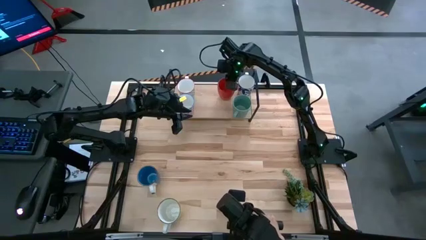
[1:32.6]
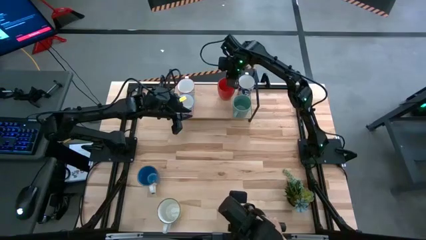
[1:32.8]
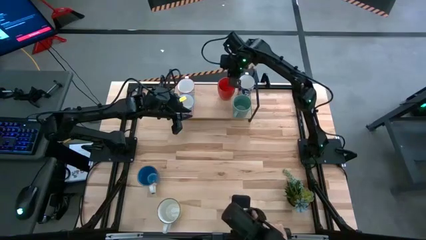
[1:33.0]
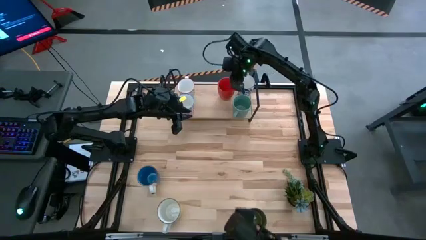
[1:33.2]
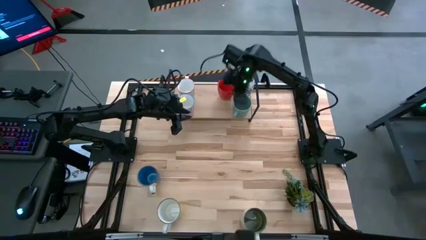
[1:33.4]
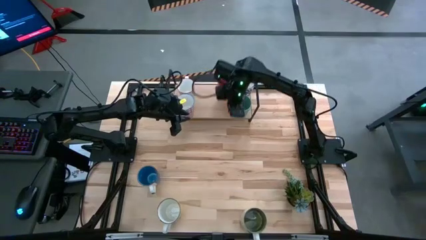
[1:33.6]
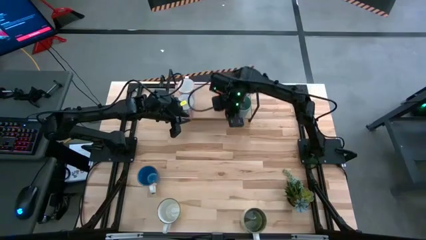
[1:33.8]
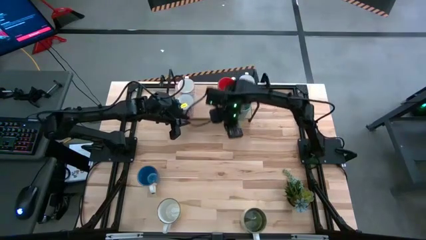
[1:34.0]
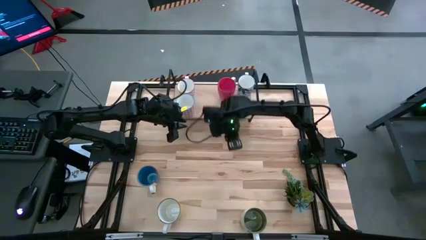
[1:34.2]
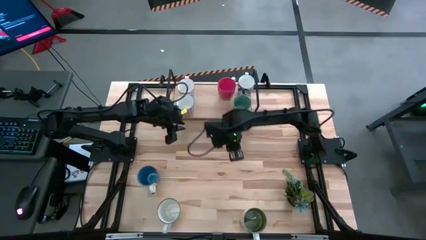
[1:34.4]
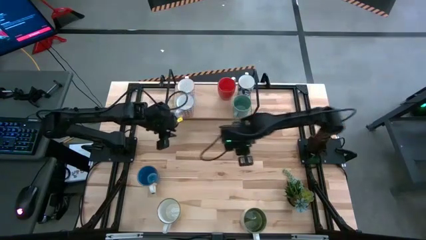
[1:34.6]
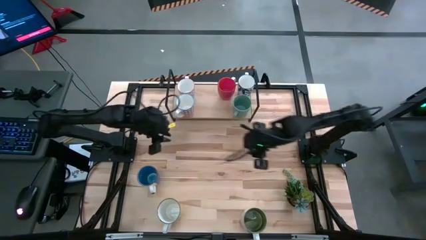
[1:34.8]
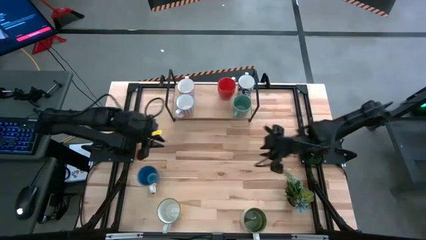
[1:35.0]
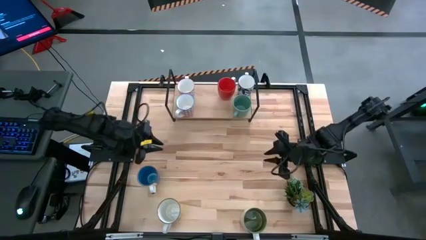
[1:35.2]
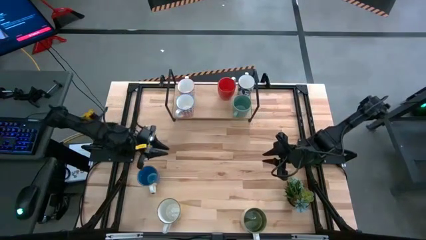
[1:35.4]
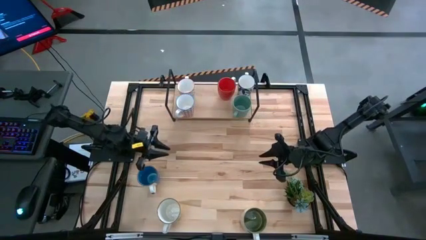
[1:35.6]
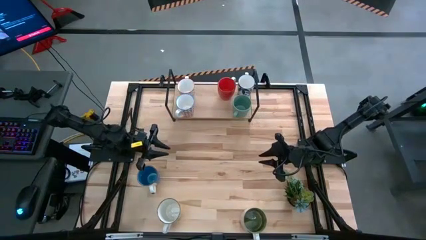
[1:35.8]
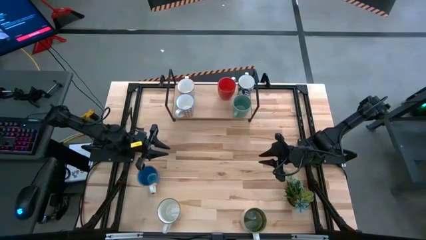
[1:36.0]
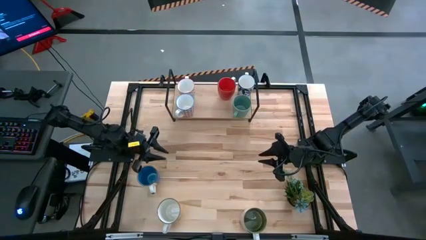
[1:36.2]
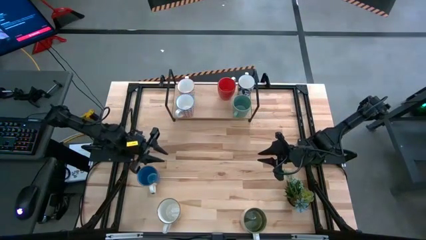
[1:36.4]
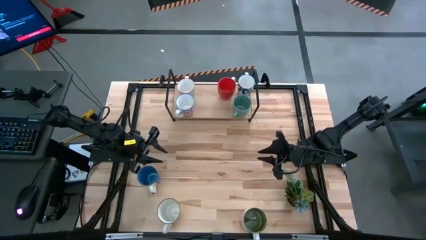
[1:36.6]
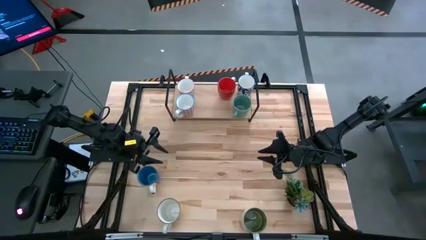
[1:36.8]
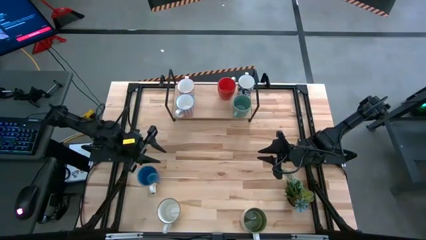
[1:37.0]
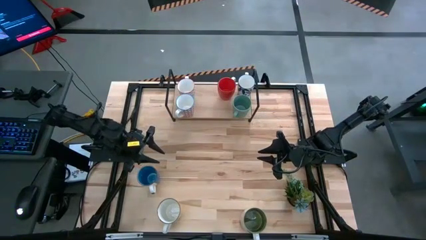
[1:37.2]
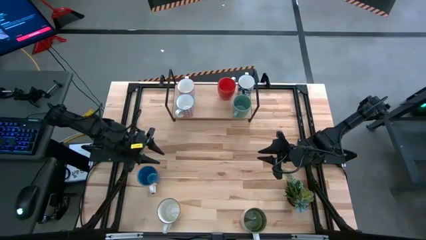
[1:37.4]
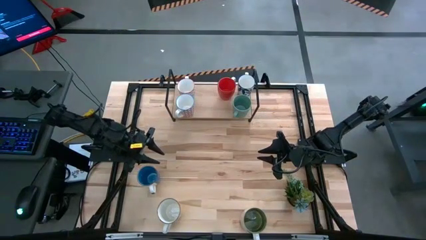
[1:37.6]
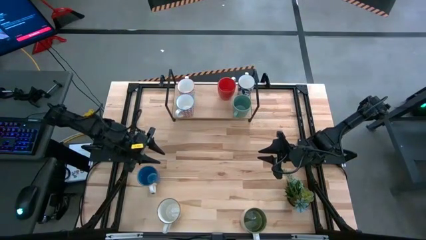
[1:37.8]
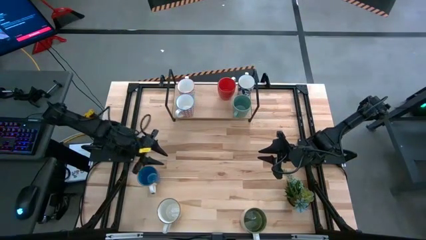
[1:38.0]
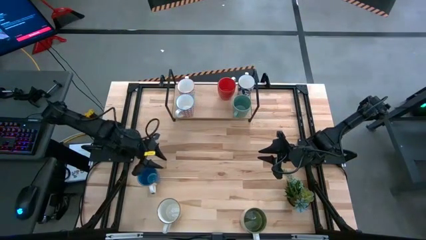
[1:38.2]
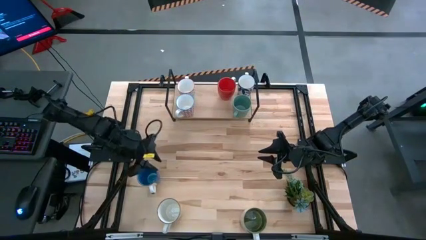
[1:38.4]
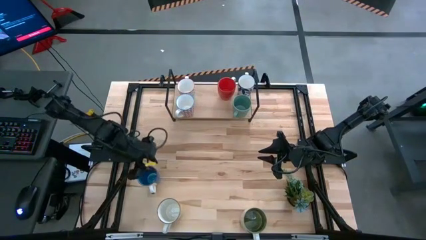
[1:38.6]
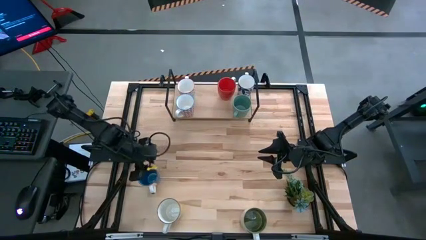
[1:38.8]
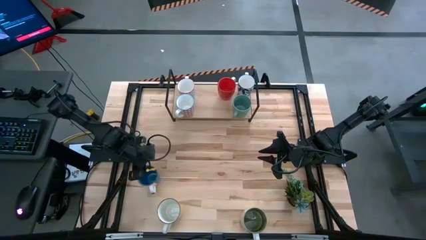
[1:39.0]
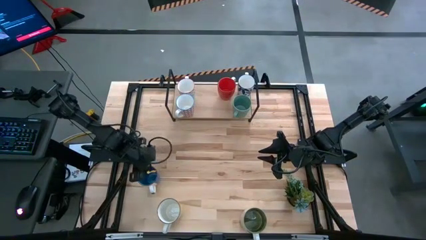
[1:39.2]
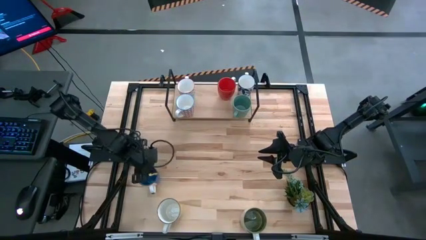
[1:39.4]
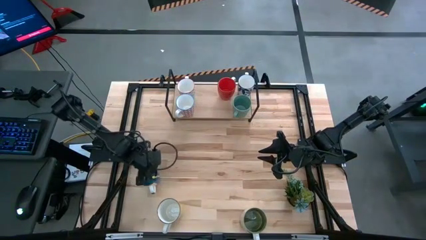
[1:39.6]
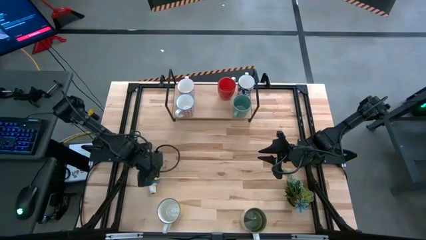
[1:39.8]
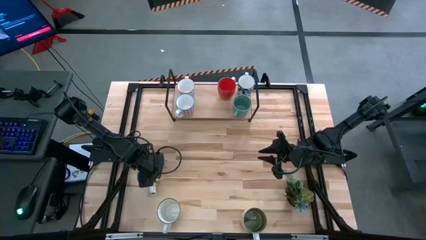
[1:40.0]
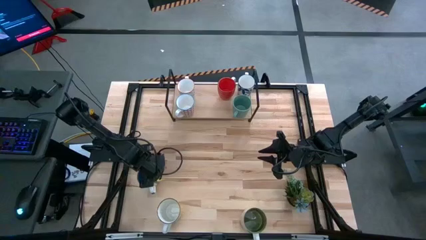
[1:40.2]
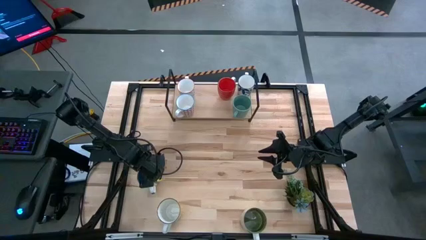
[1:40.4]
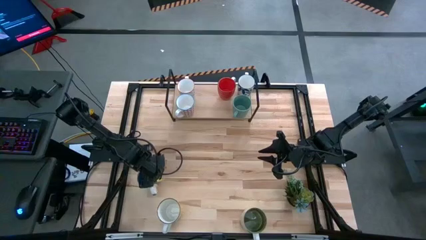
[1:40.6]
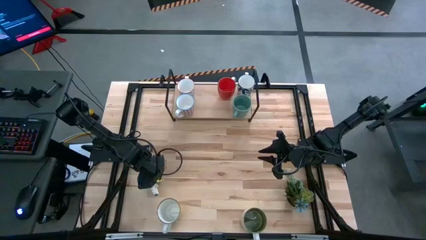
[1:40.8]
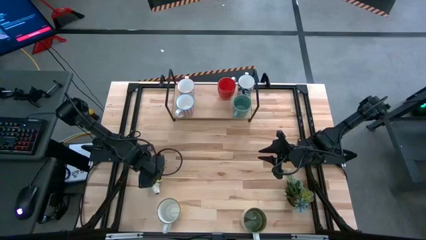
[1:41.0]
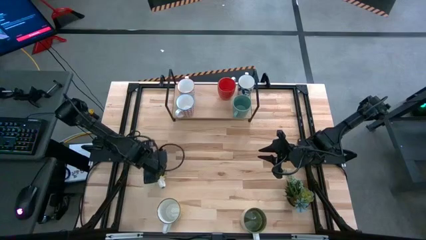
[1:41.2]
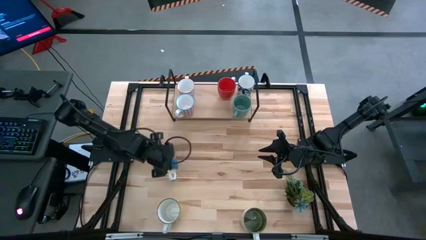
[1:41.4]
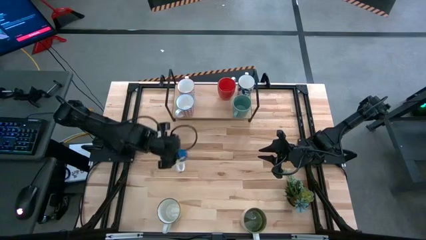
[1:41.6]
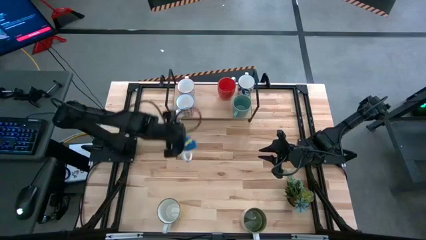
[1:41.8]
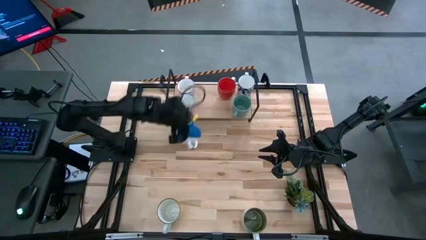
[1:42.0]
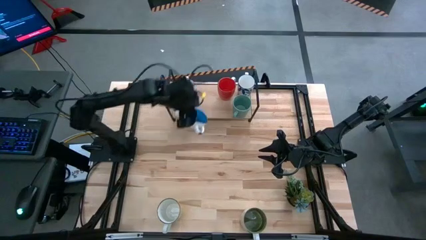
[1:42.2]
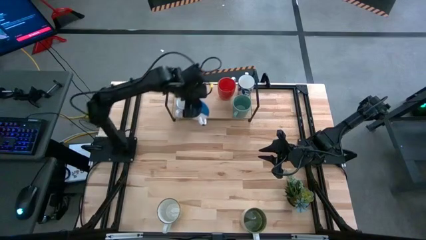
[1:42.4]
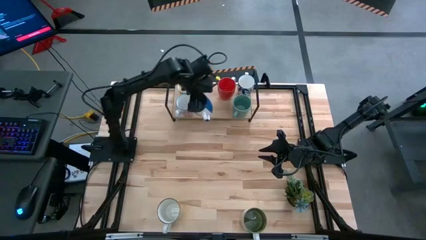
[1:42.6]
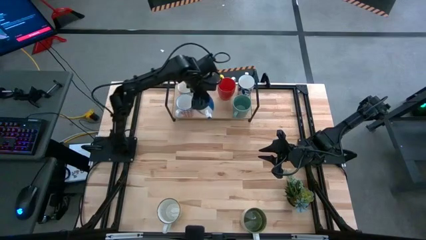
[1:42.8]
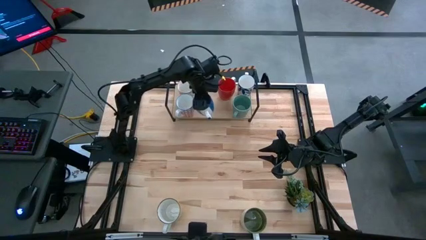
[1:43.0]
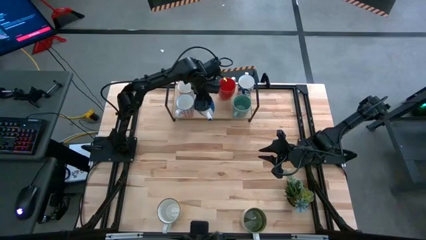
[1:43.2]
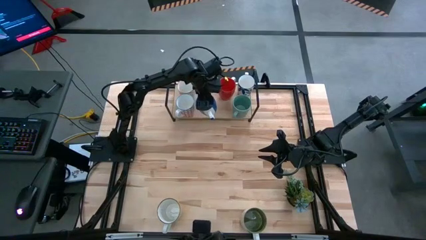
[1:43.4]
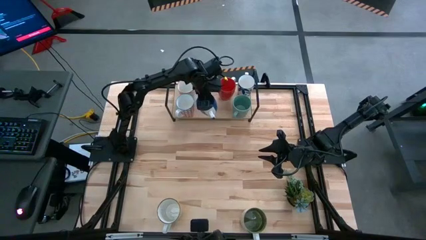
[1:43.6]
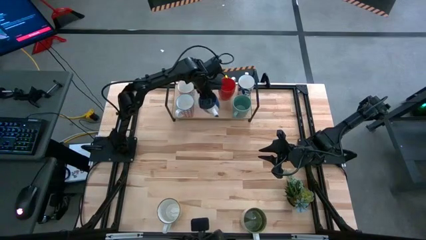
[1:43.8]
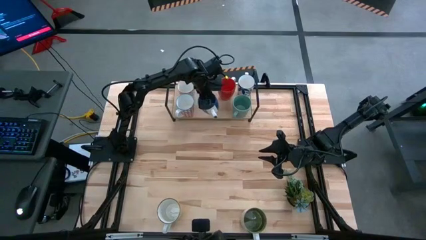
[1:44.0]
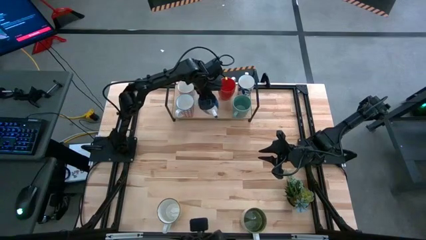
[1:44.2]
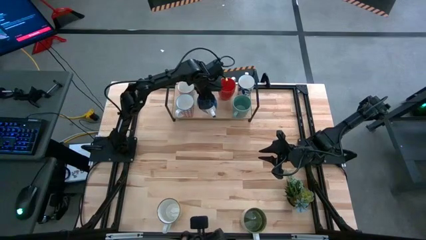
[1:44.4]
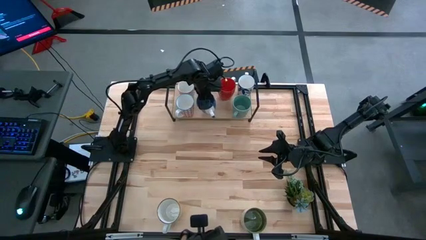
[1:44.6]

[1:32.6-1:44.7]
Task: Place coffee mugs
Put the blue mug on the shelf
